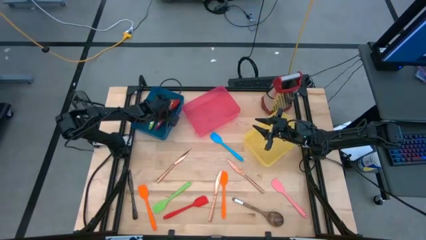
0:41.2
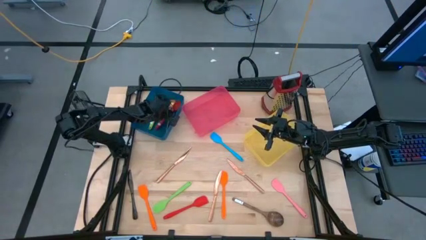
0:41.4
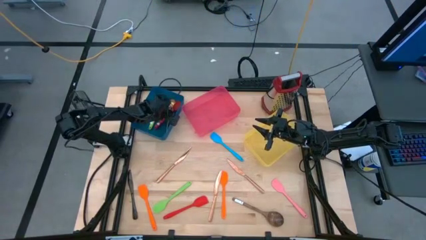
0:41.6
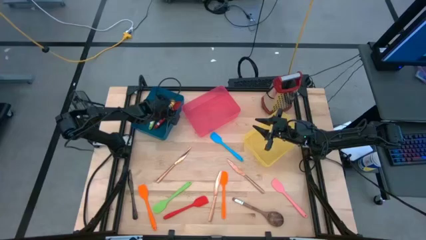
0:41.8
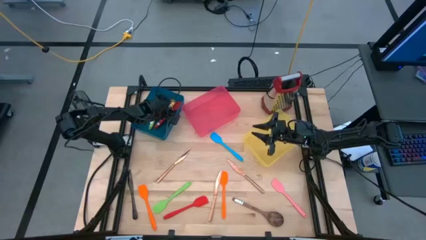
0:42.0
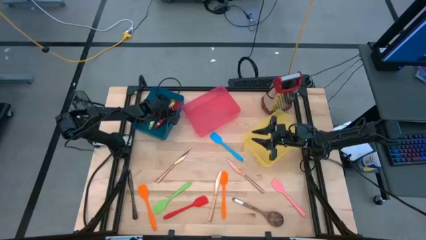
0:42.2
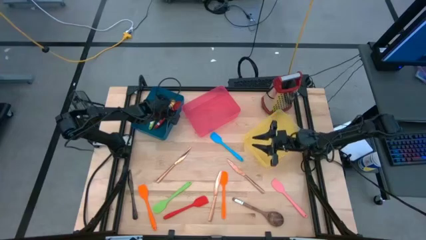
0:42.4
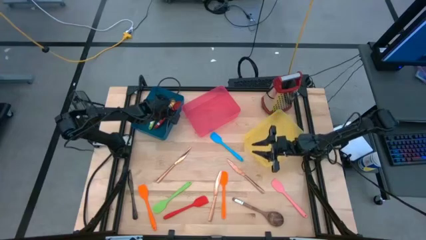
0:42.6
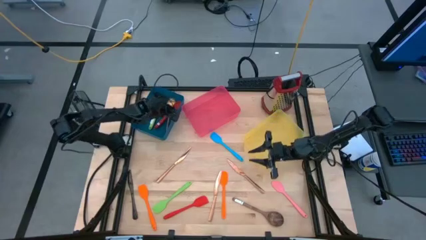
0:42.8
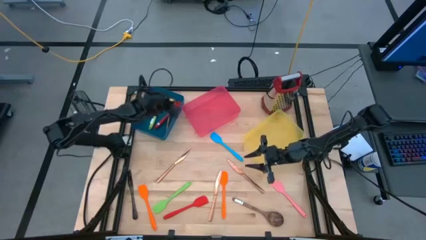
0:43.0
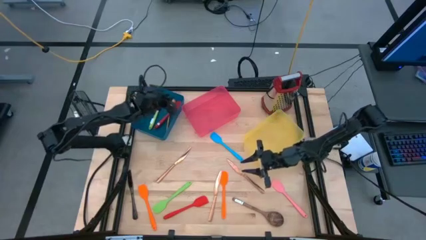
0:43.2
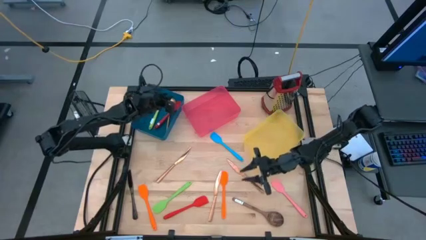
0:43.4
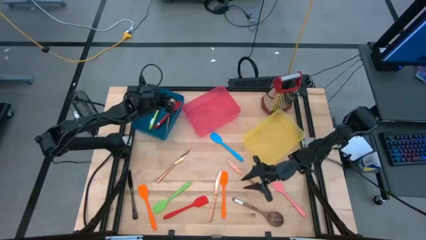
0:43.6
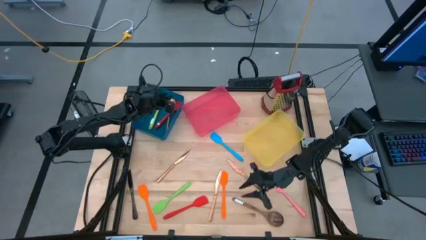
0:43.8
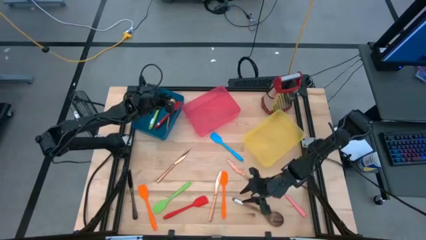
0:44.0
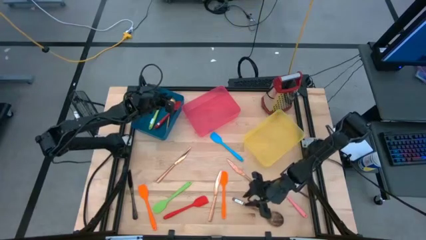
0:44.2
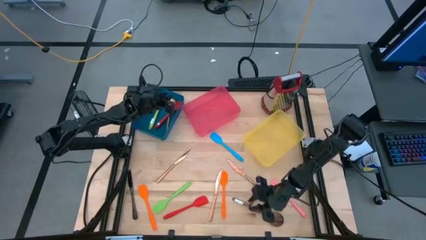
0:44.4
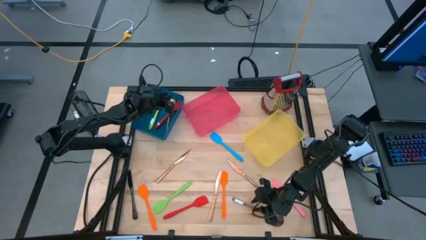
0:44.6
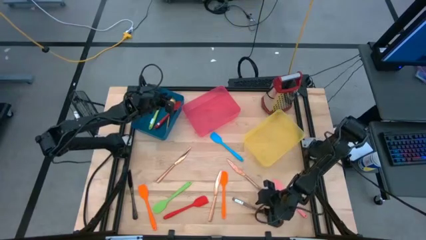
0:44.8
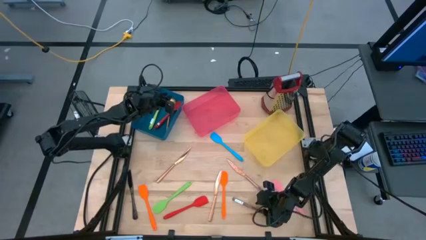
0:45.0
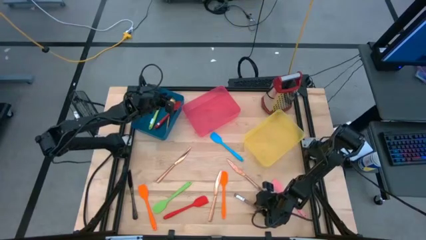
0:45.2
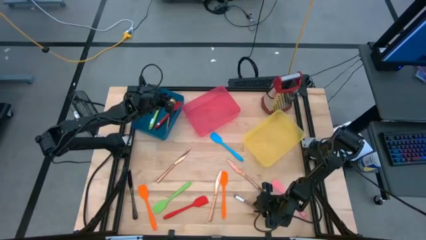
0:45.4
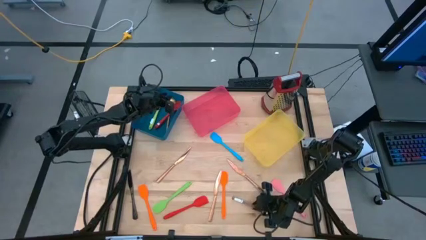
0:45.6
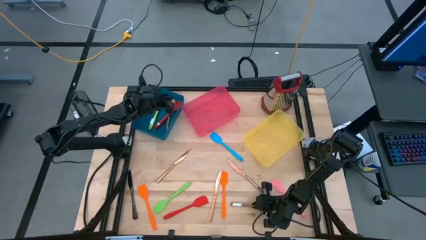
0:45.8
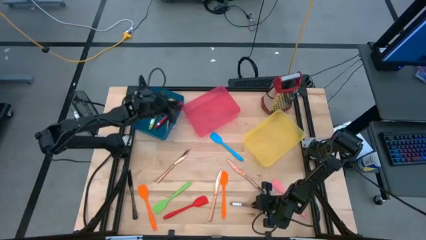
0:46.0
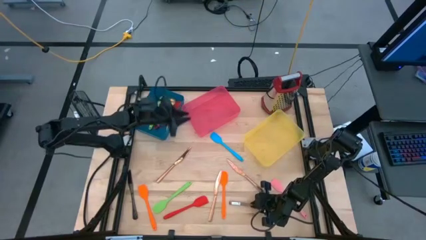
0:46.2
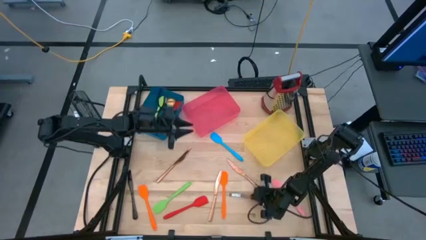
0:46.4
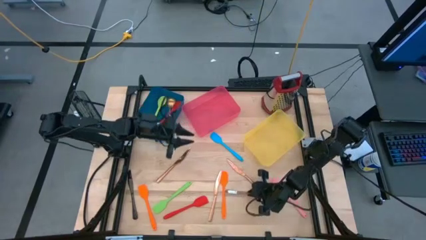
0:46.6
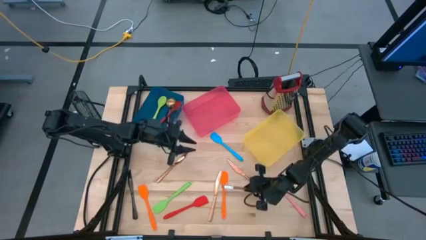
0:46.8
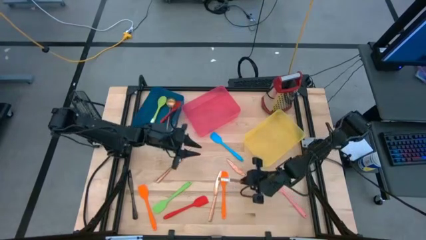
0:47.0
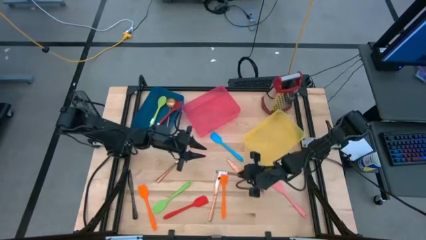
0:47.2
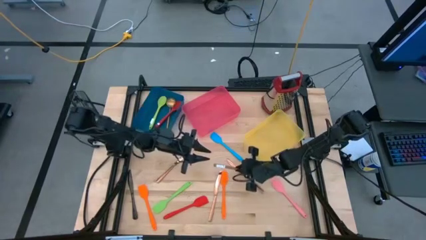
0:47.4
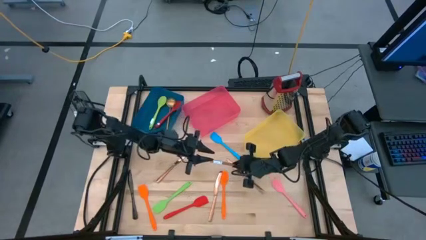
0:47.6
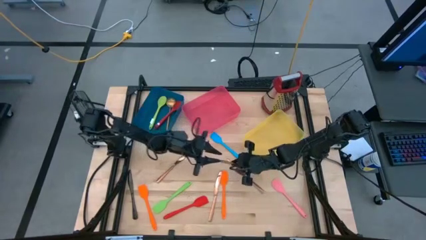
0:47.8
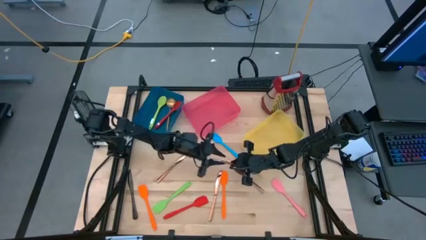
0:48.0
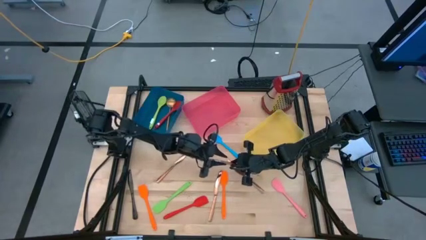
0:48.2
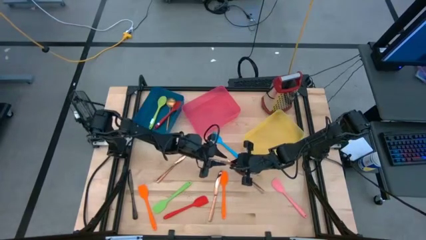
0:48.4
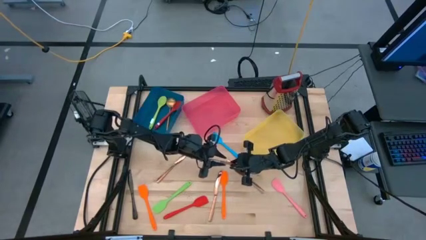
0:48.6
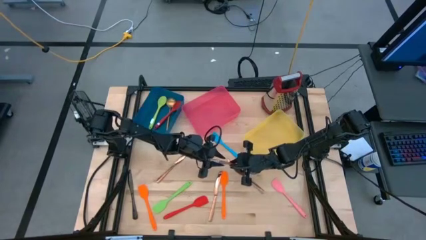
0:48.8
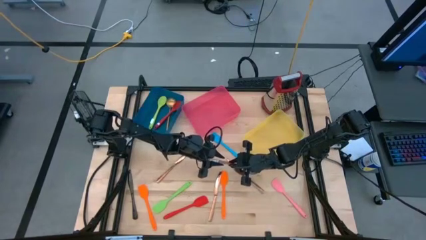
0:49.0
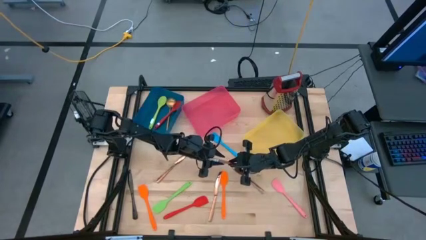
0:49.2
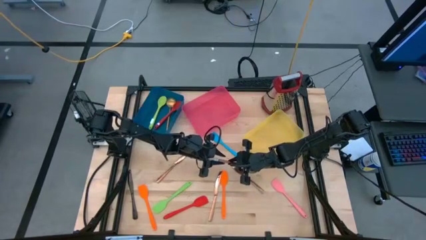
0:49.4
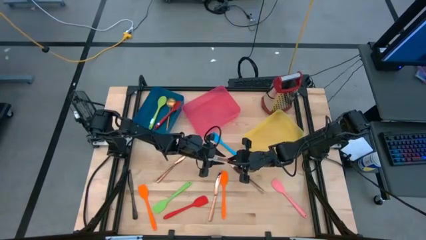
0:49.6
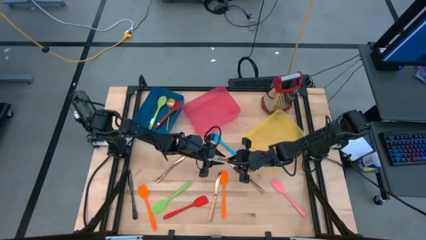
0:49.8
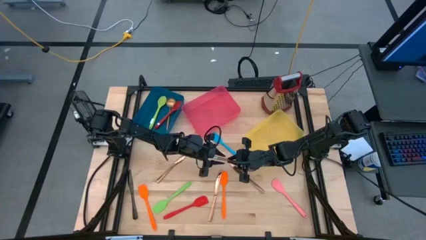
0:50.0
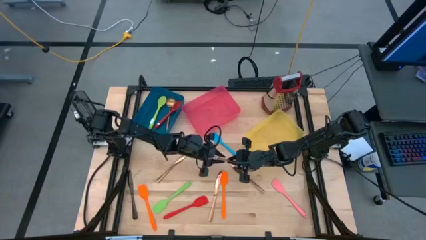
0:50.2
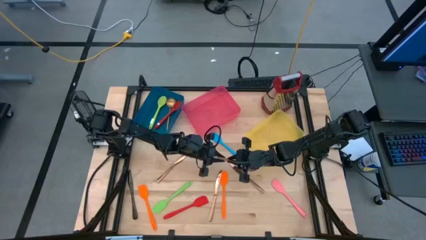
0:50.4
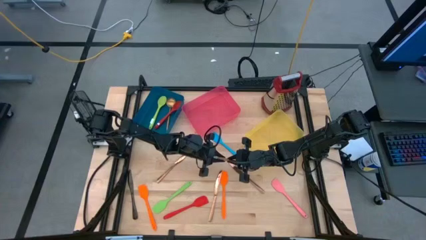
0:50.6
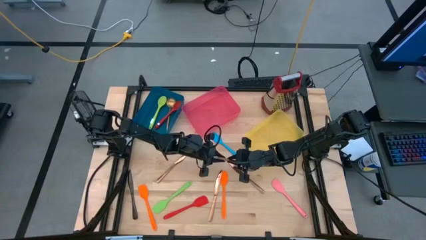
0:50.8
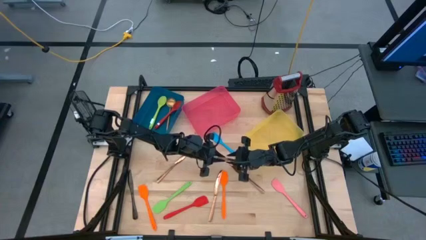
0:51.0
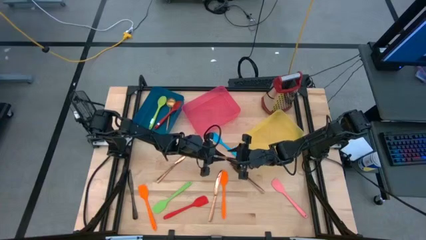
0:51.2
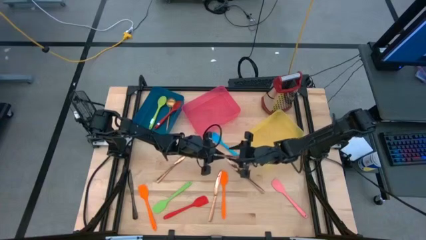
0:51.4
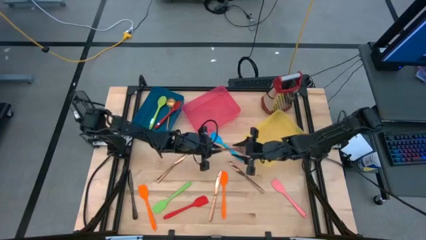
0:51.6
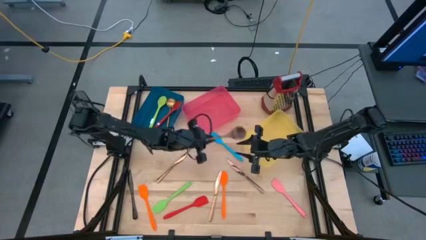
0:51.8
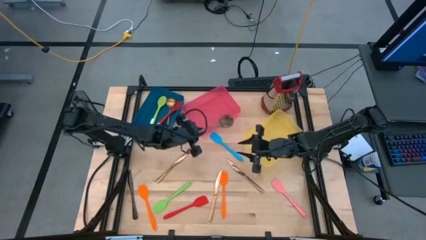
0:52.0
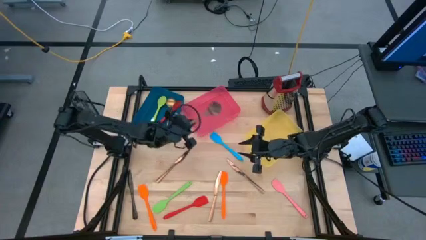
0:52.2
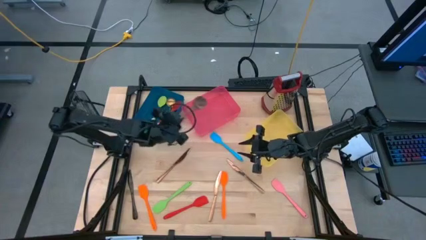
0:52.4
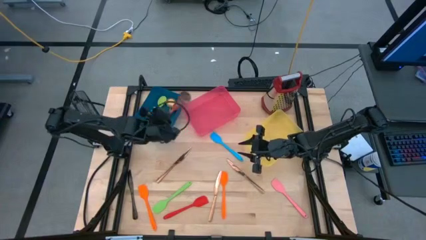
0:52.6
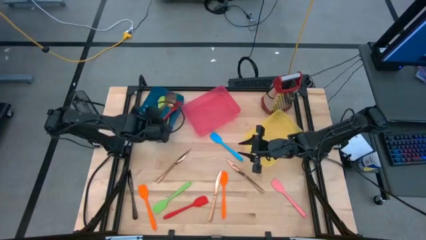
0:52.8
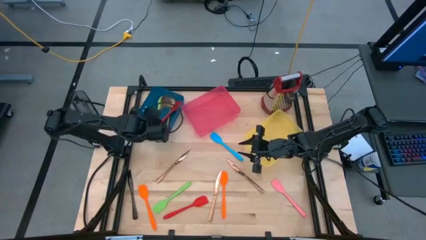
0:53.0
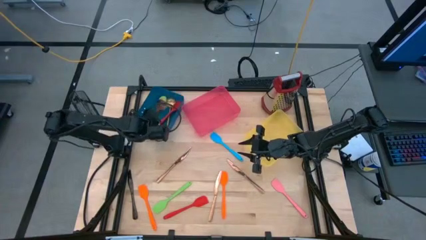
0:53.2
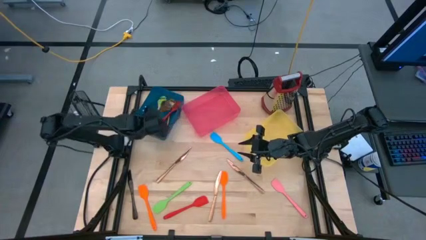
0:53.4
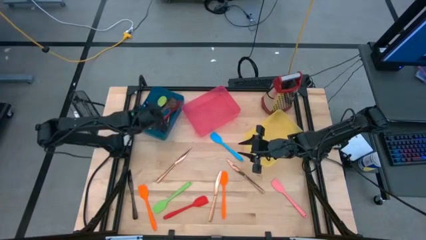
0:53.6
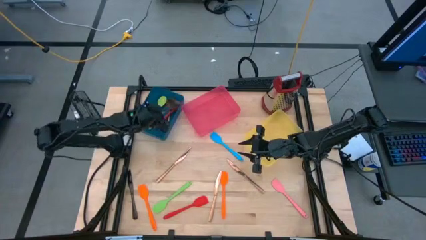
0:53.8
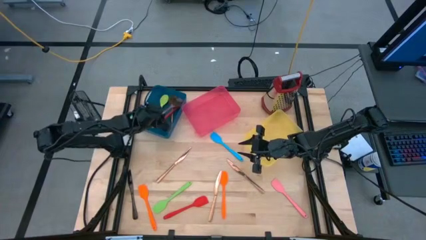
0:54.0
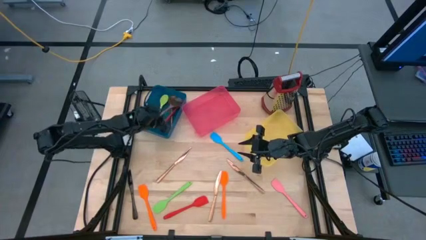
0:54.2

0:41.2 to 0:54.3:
Task: Pick & Place Kitchen Items
Put the wooden spoon into the blue bin

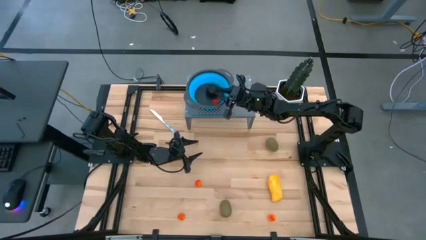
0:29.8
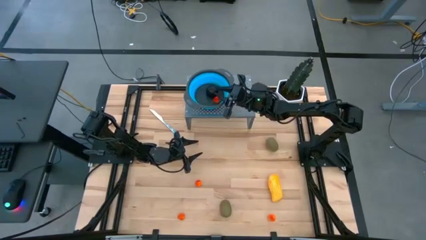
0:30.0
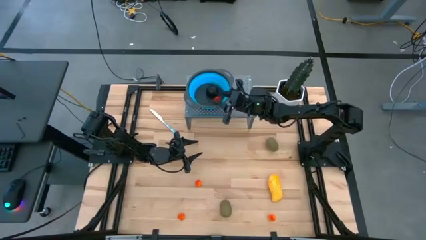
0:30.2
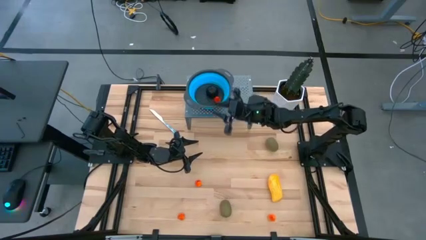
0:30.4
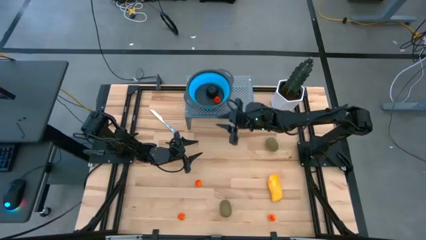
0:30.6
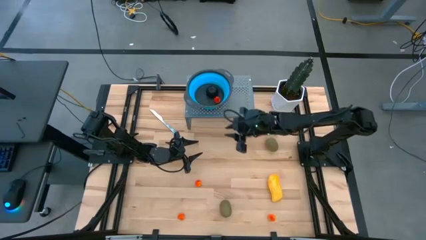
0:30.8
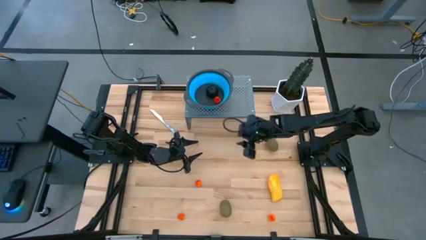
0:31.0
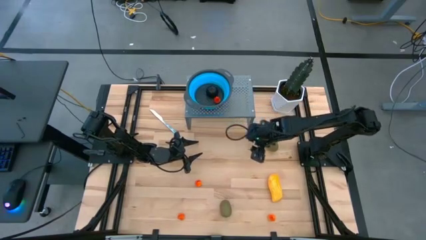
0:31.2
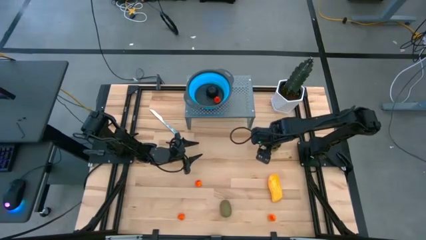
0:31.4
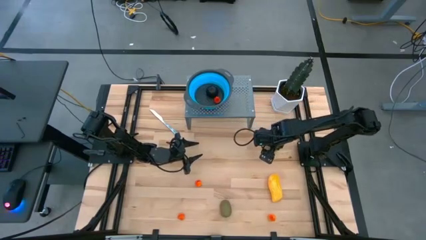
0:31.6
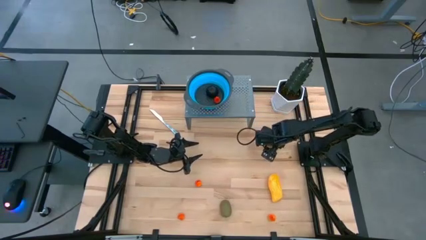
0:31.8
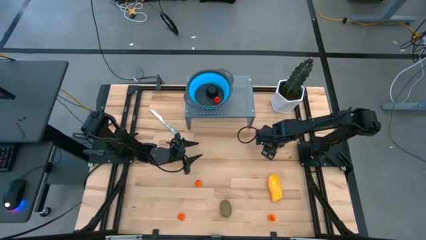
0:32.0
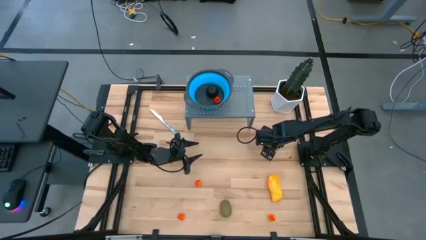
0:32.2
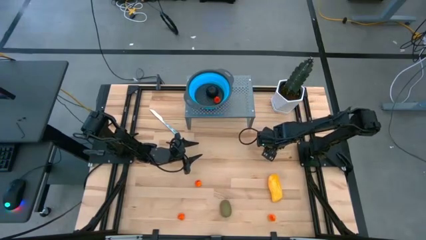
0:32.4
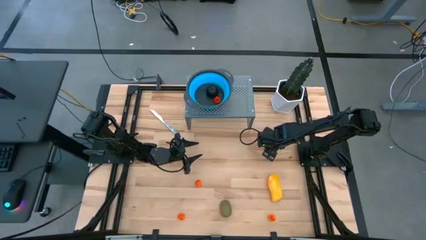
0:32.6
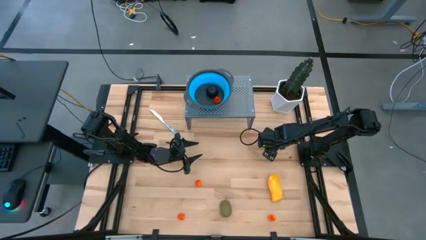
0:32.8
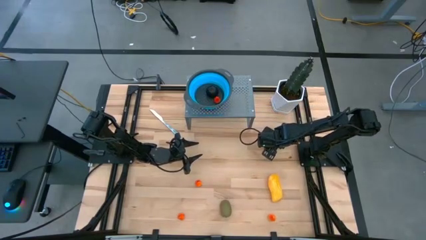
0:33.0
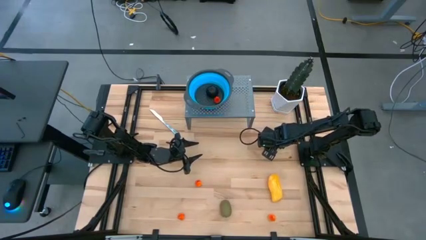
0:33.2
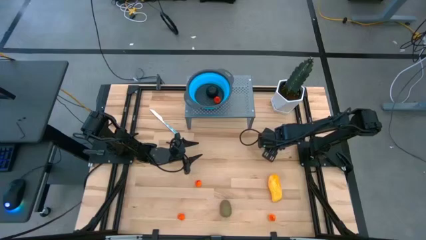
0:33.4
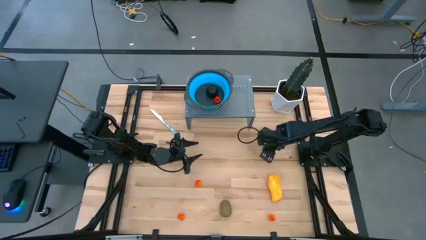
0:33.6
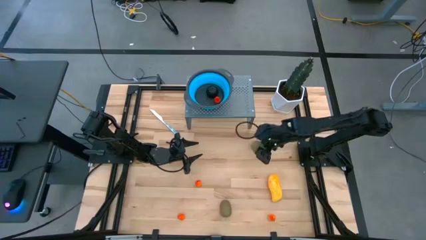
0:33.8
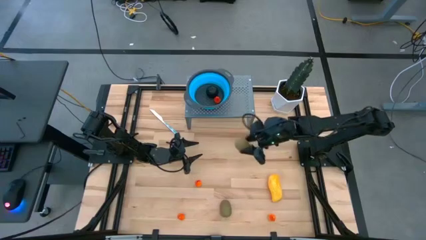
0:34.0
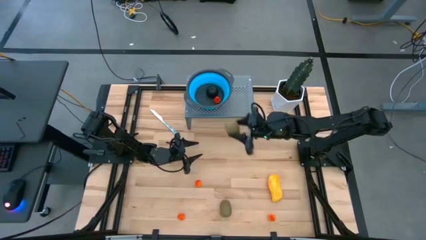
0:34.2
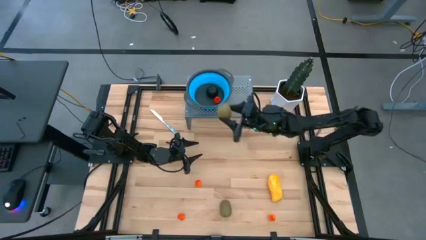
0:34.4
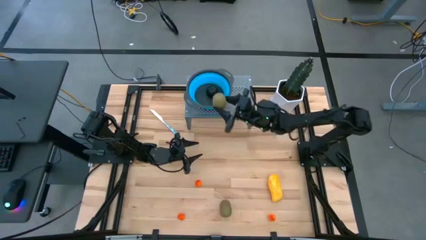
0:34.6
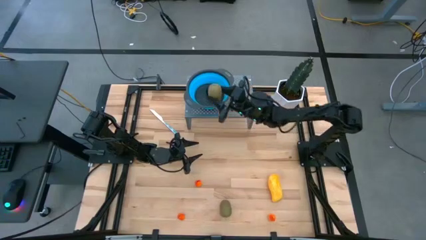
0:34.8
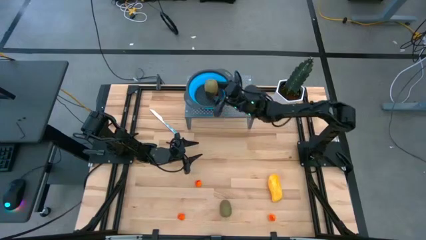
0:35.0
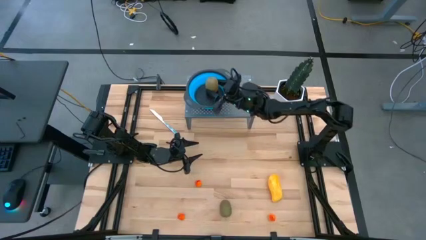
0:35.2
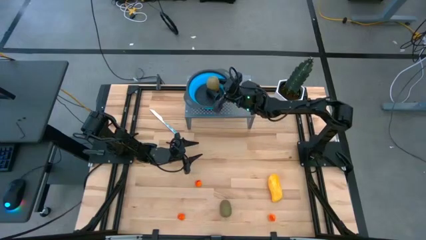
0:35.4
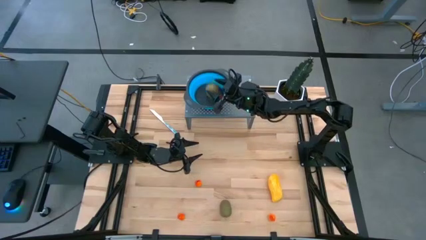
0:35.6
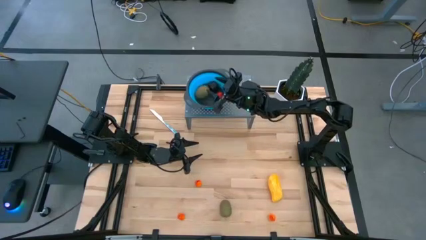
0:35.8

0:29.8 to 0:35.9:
Task: Pick & Place Fruit
Put the green kiwi into the blue strainer bowl
